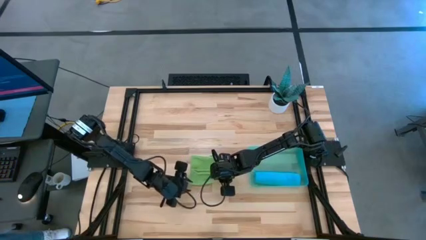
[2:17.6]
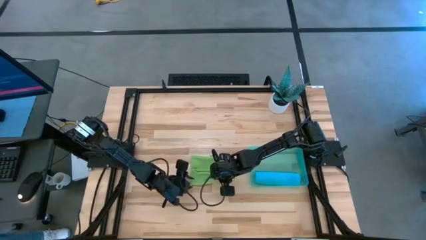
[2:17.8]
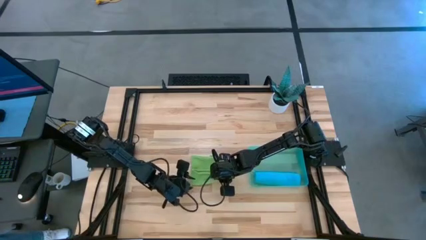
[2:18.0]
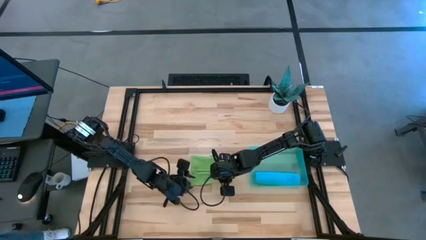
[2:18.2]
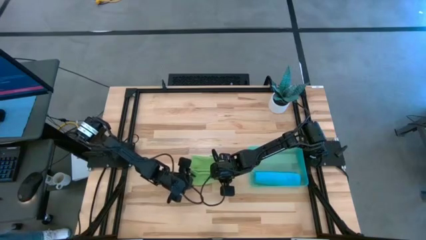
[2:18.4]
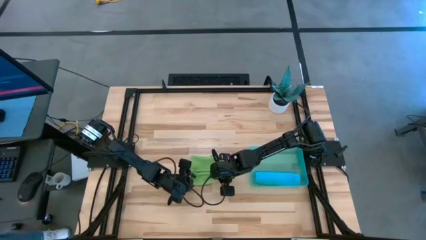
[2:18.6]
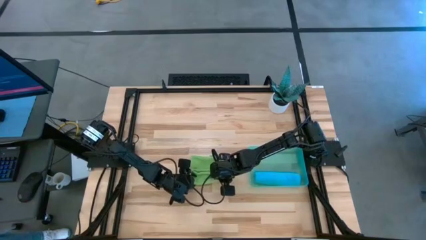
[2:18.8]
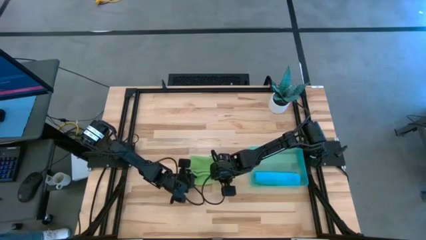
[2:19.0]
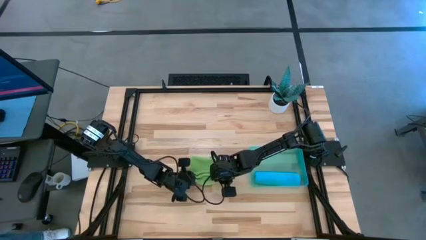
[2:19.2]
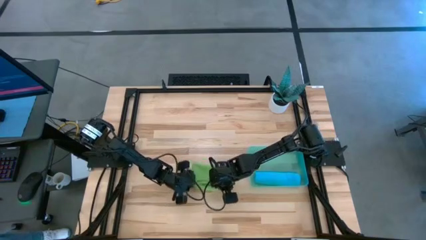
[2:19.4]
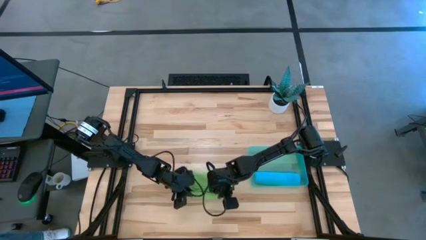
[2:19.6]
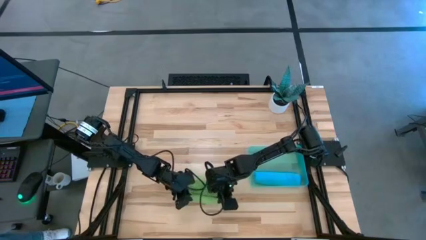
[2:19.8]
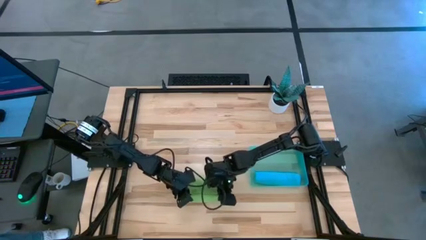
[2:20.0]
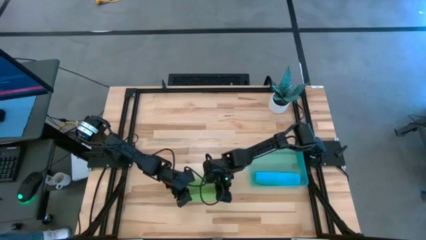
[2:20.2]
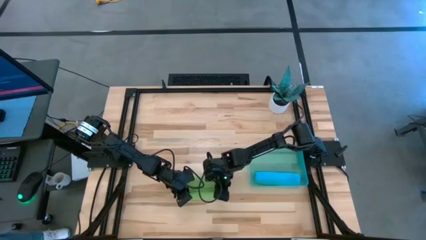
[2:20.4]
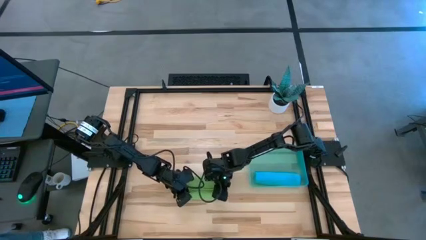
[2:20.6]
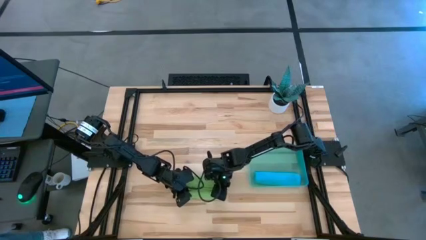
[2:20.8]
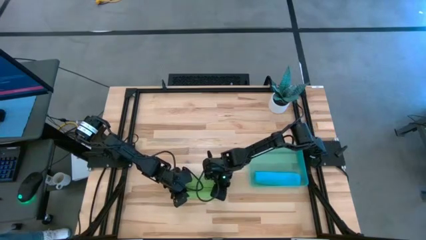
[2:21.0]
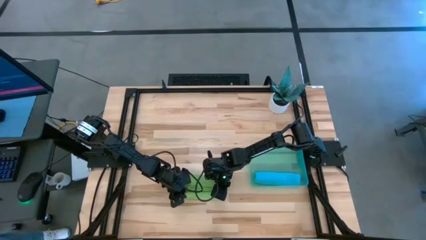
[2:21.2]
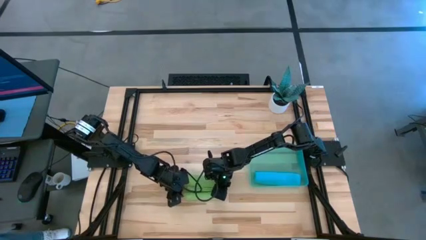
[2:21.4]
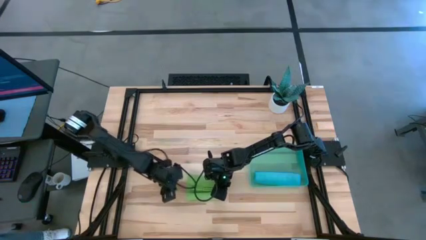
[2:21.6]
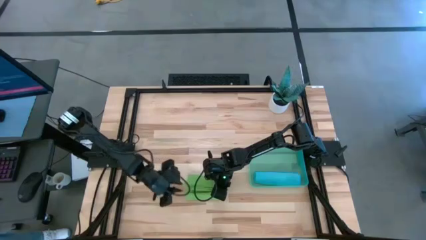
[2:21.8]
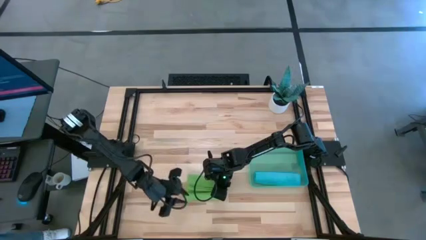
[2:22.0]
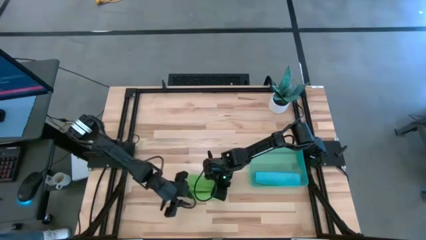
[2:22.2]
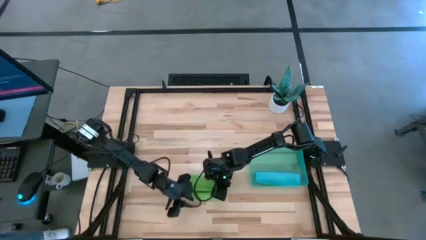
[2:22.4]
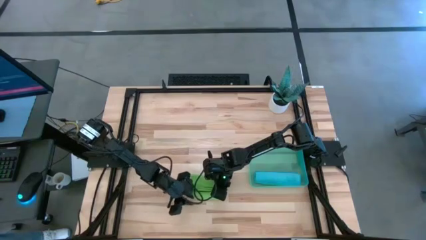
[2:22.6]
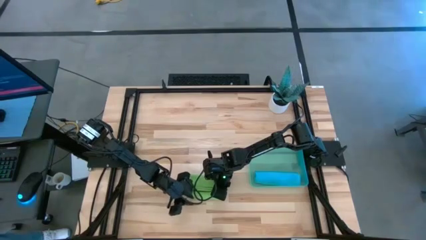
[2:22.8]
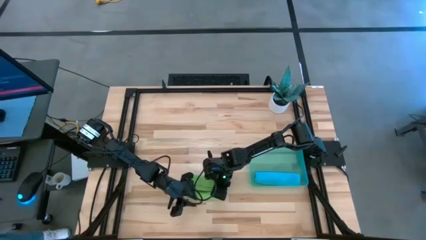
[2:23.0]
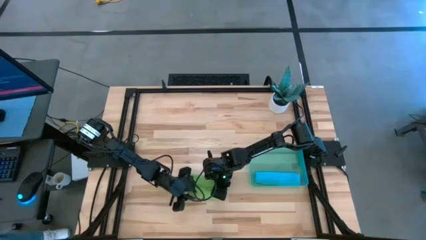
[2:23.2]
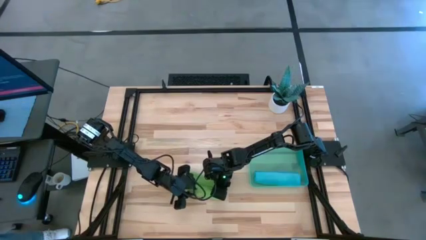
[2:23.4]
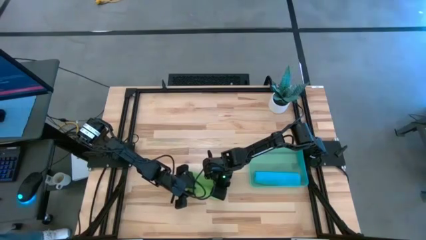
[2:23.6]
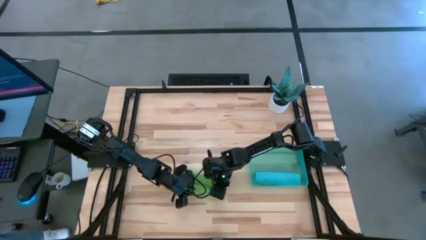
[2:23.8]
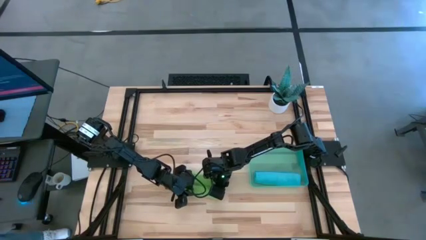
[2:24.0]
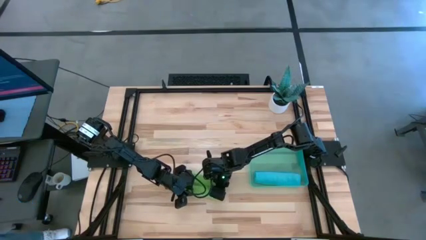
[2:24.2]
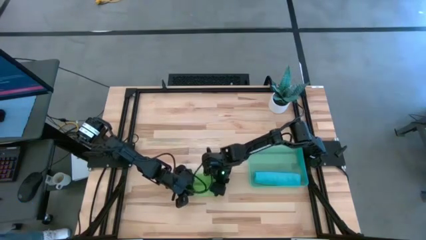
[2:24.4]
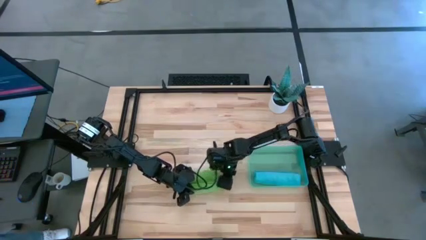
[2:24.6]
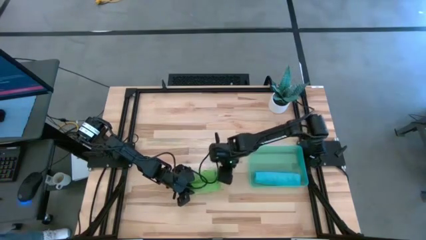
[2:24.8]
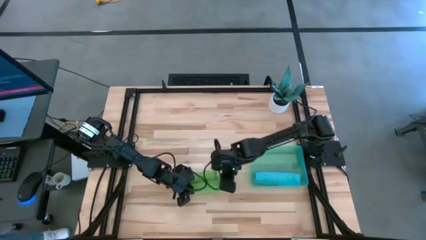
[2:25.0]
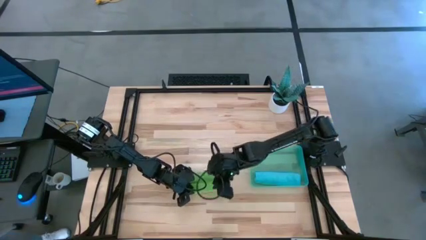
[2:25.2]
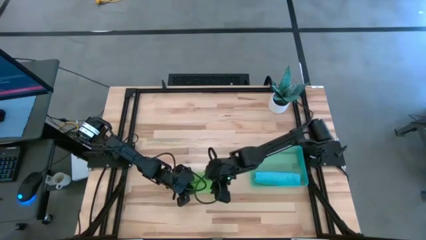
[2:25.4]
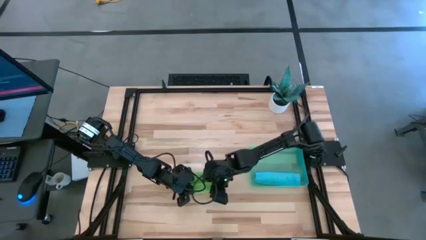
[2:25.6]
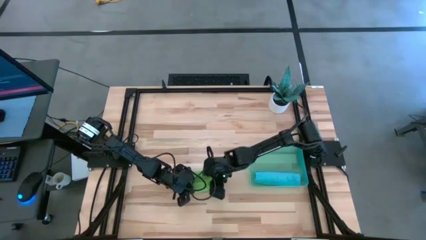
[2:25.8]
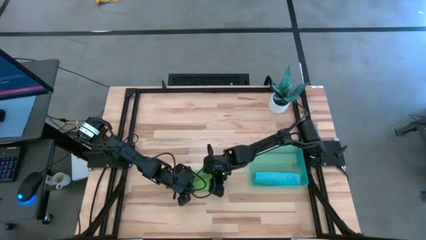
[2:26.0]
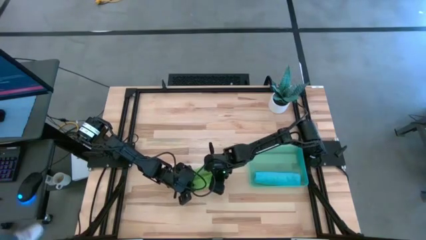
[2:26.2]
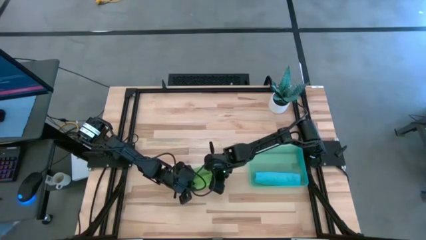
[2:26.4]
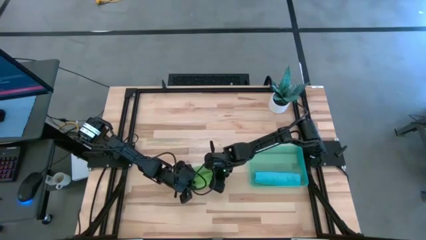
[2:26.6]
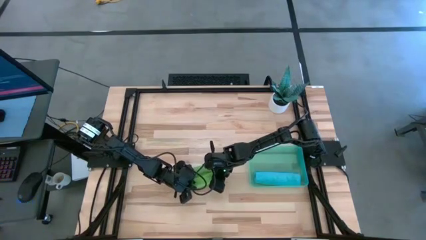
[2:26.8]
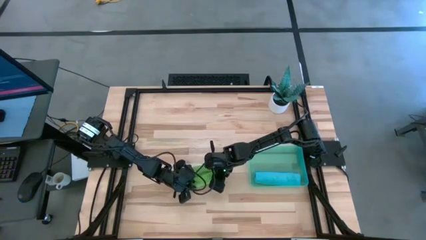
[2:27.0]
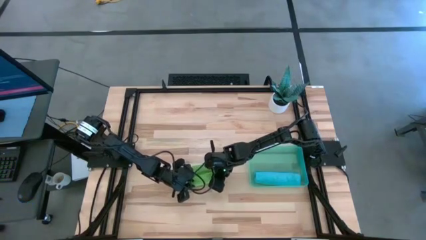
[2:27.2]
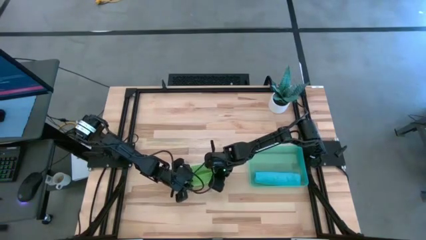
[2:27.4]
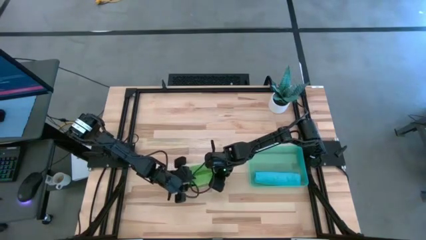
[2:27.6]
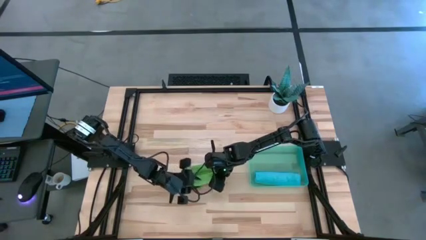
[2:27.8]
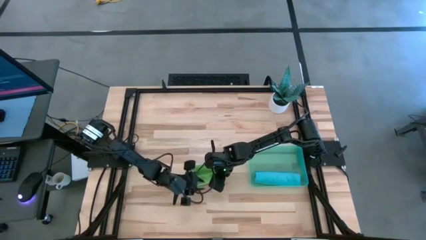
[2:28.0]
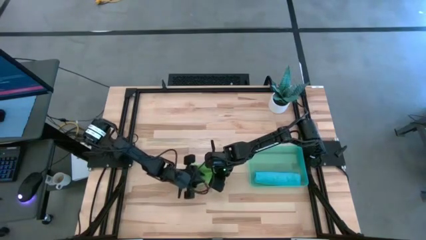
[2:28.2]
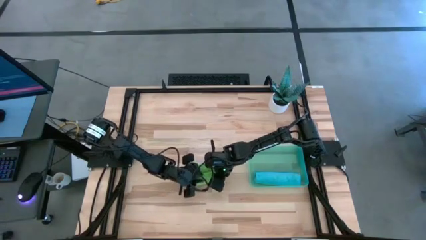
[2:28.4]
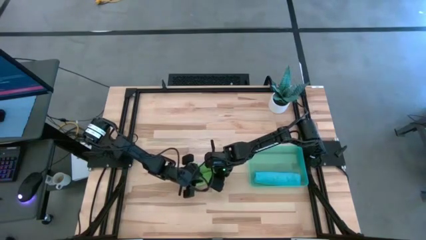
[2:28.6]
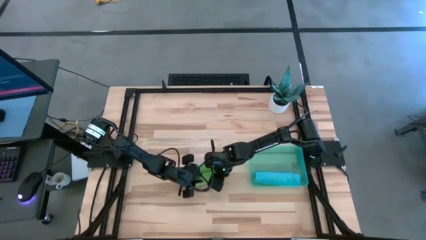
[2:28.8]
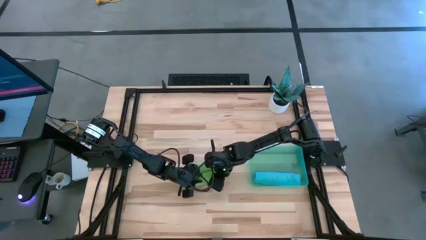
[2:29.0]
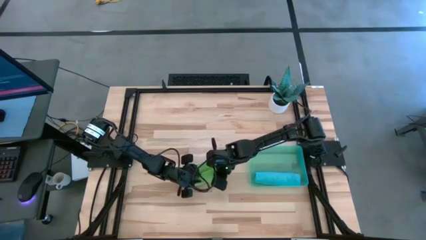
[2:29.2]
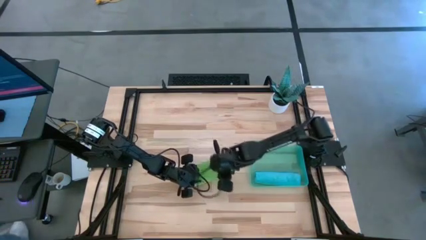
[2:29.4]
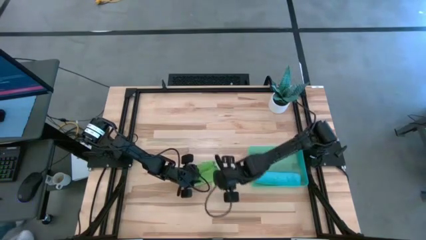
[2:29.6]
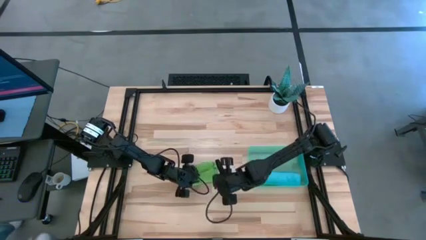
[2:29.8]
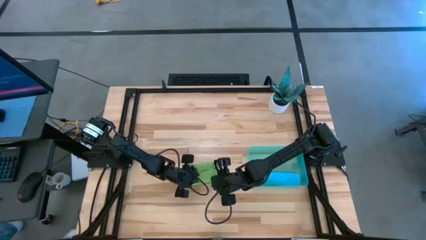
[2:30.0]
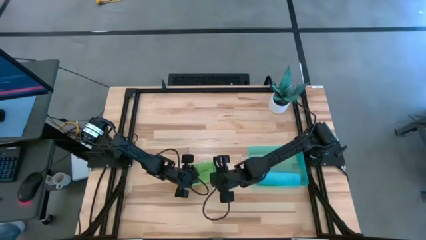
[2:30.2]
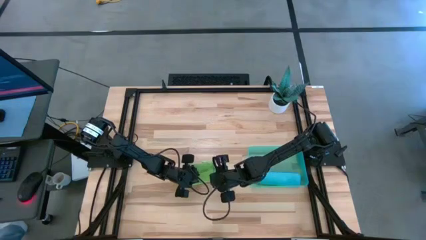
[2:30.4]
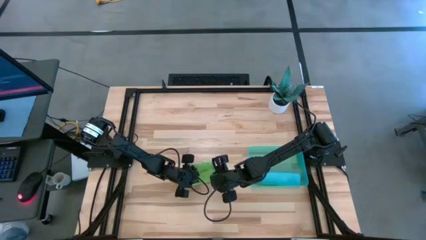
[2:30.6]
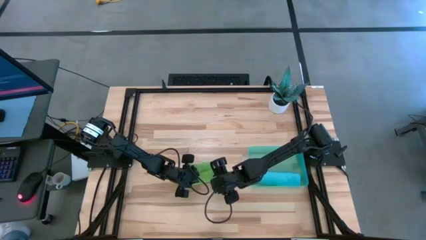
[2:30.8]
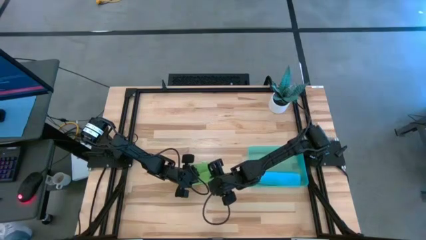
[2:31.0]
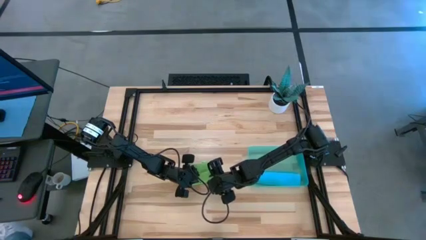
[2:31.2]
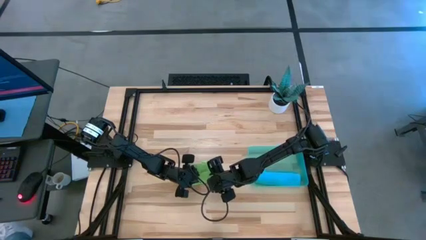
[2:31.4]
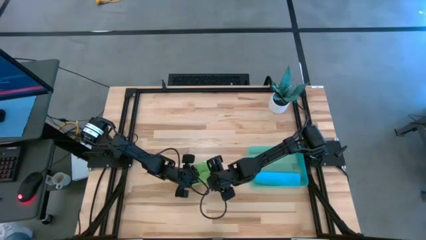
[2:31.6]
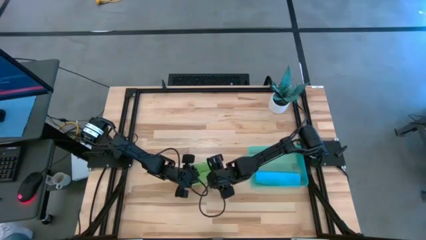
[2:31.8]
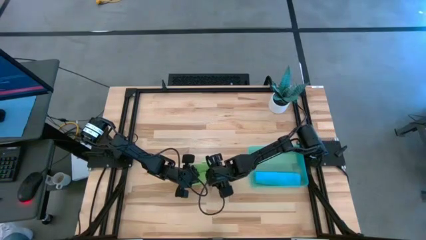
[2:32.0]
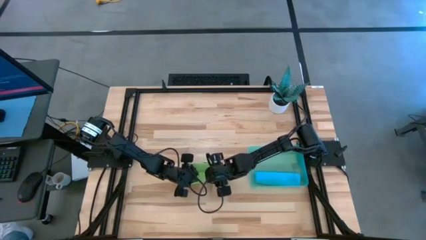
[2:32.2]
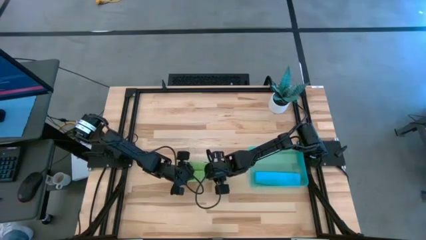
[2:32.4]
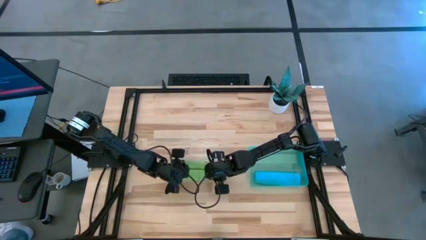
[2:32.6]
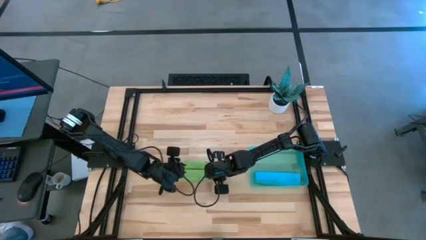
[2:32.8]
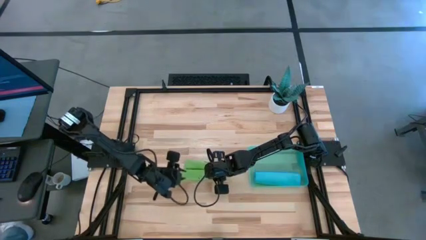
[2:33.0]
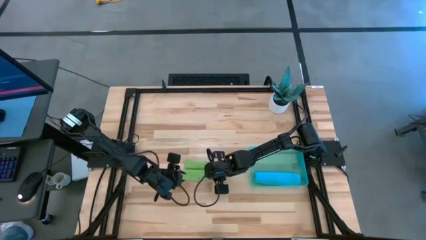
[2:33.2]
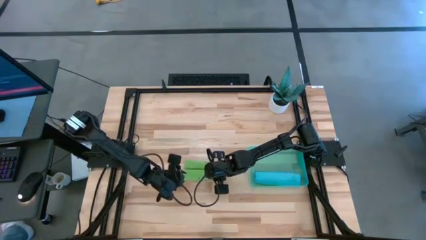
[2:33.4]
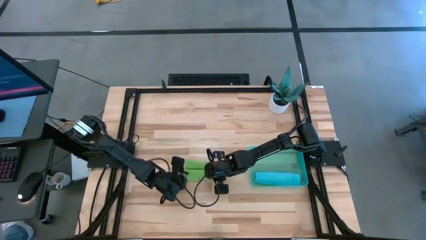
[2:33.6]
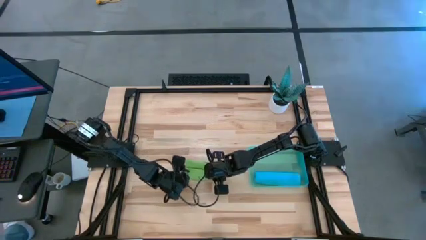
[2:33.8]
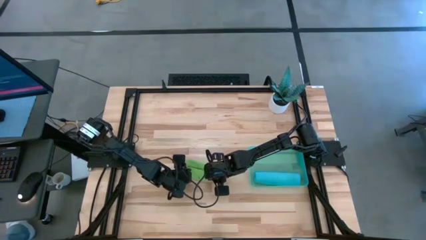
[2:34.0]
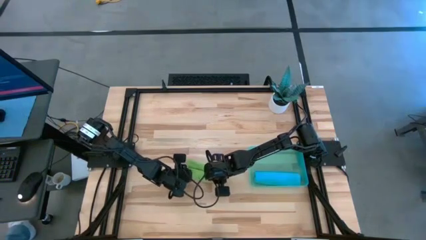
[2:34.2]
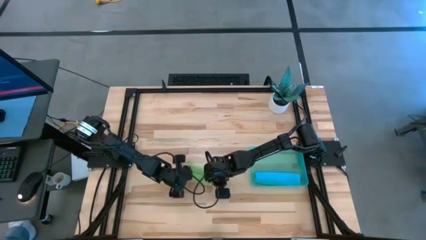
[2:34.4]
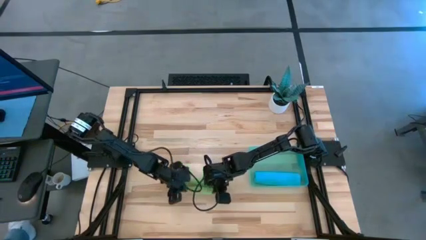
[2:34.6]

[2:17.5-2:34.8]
Task: Roll microfiber towels into tight, uniform cylinder then place into a basket
Roll the green microfiber towel
